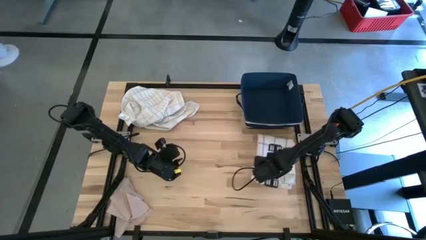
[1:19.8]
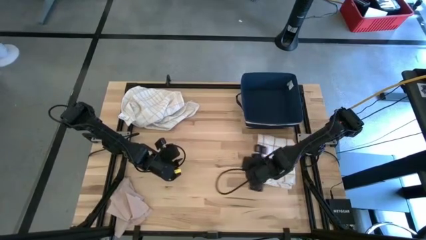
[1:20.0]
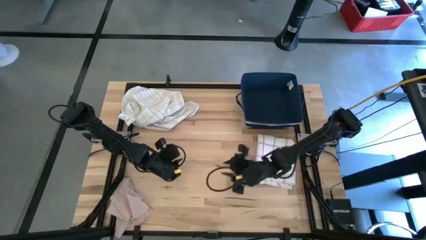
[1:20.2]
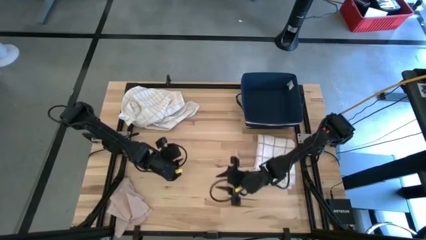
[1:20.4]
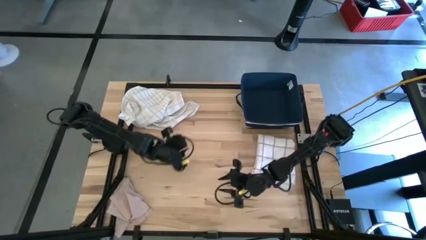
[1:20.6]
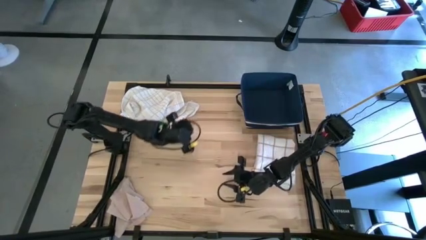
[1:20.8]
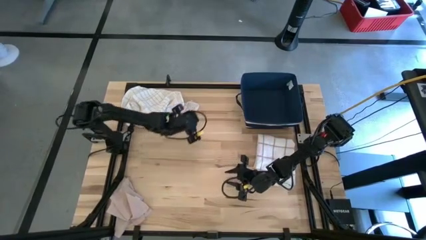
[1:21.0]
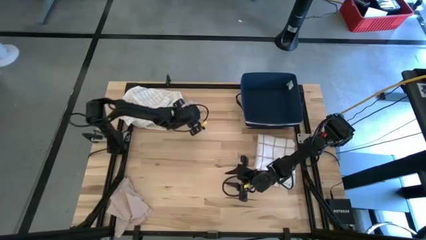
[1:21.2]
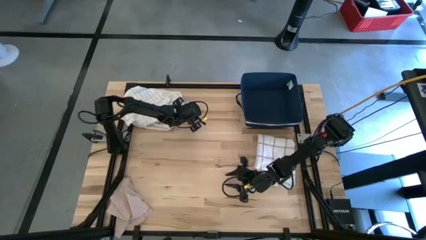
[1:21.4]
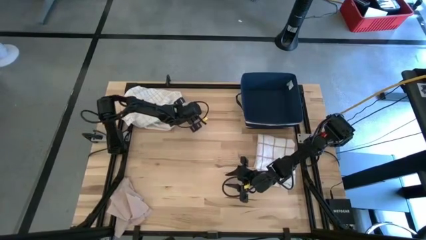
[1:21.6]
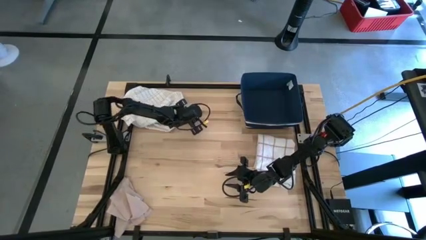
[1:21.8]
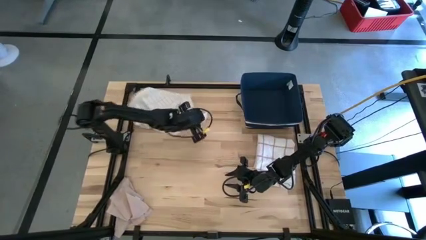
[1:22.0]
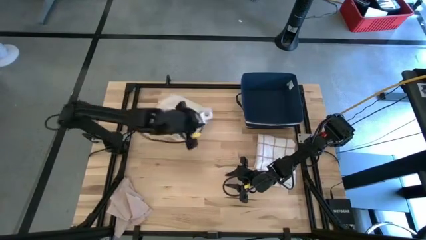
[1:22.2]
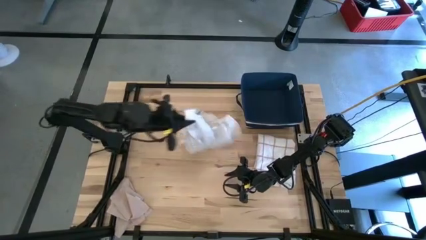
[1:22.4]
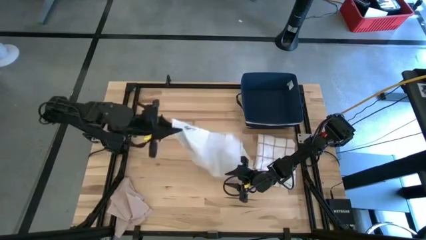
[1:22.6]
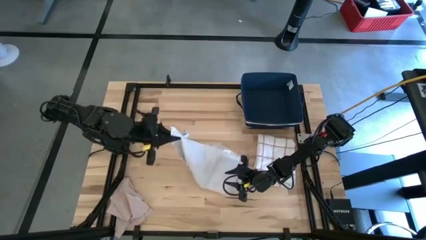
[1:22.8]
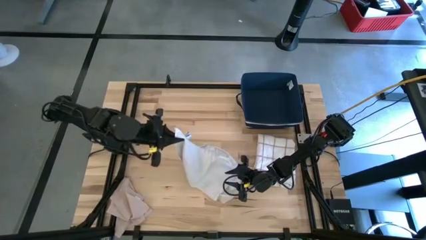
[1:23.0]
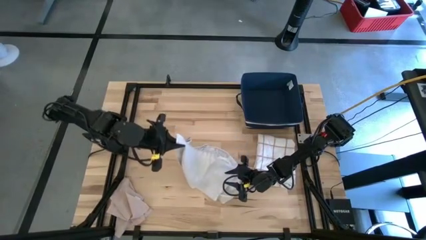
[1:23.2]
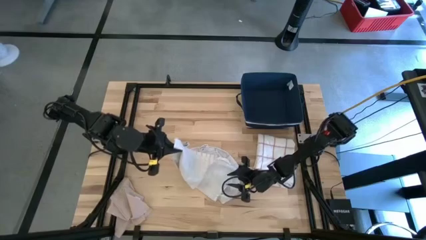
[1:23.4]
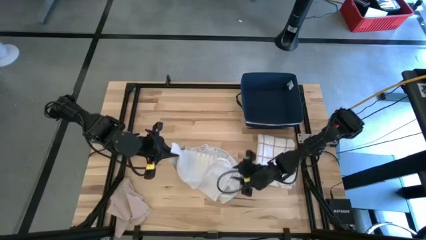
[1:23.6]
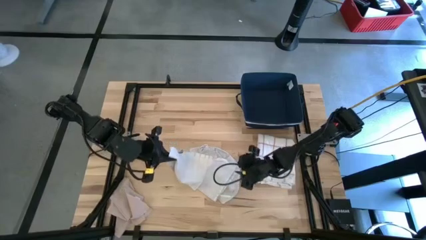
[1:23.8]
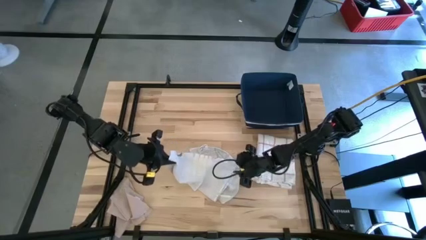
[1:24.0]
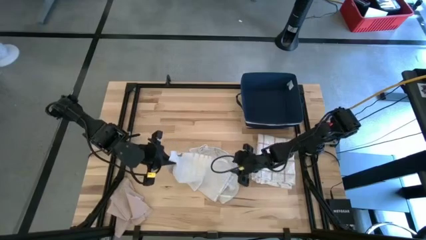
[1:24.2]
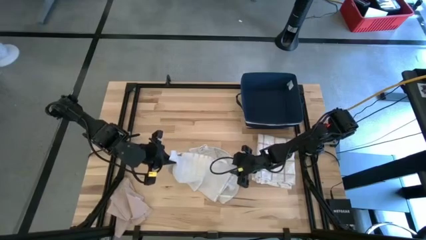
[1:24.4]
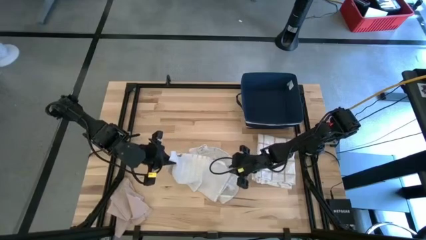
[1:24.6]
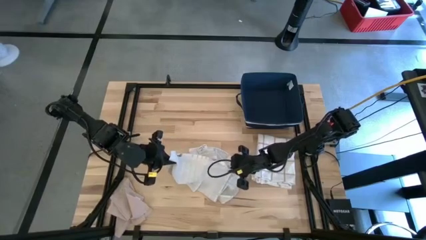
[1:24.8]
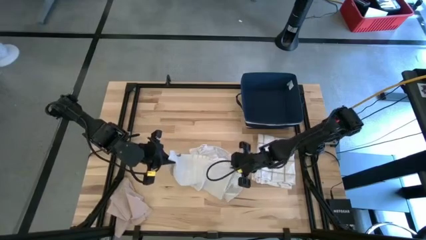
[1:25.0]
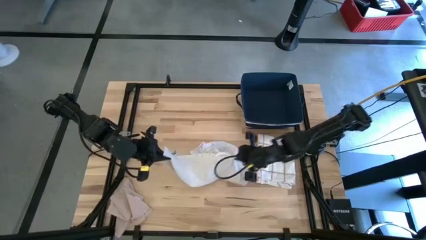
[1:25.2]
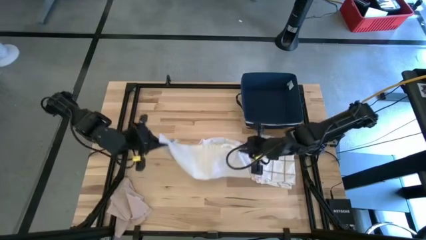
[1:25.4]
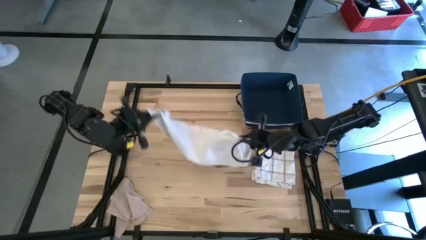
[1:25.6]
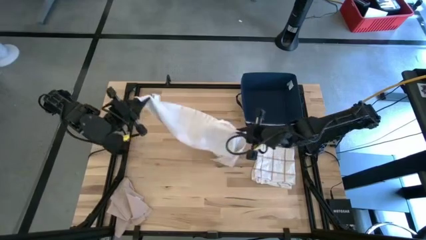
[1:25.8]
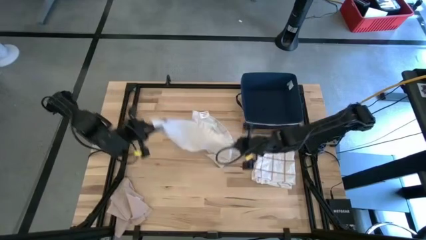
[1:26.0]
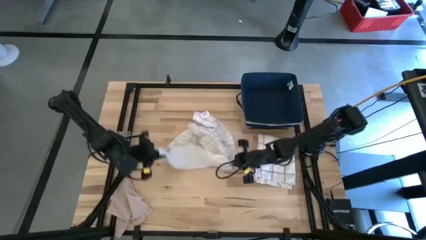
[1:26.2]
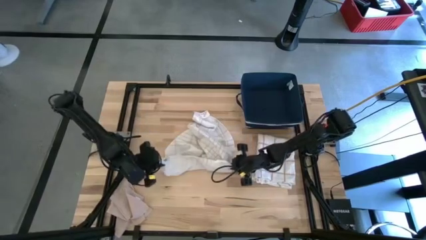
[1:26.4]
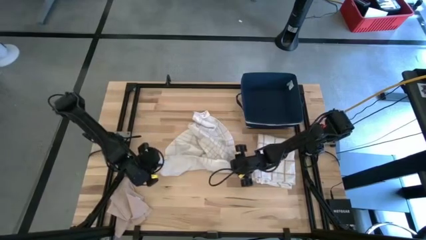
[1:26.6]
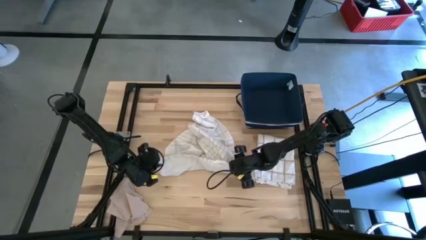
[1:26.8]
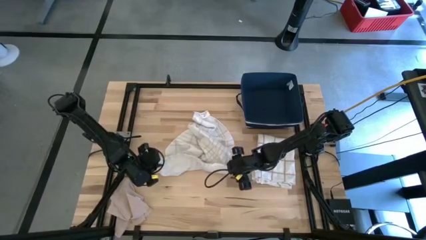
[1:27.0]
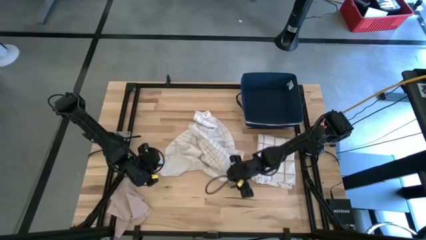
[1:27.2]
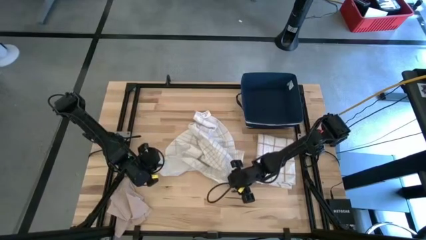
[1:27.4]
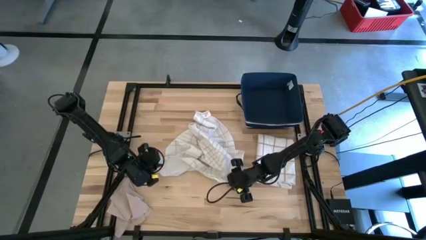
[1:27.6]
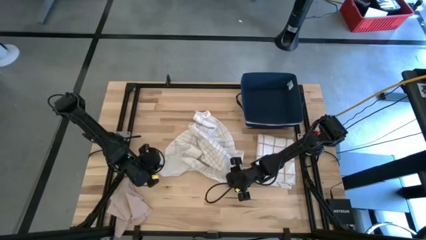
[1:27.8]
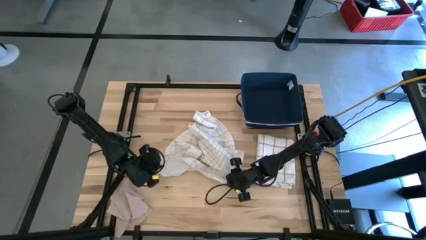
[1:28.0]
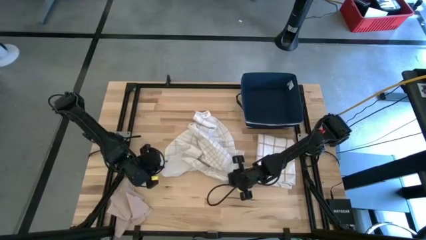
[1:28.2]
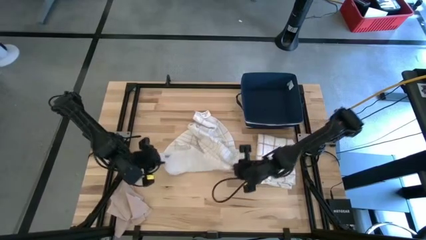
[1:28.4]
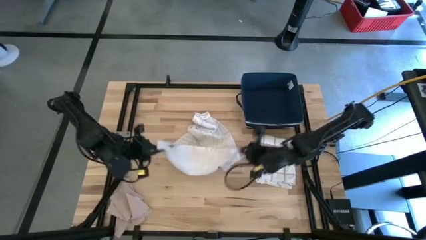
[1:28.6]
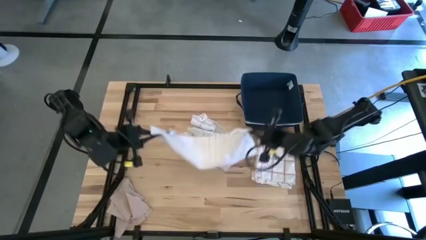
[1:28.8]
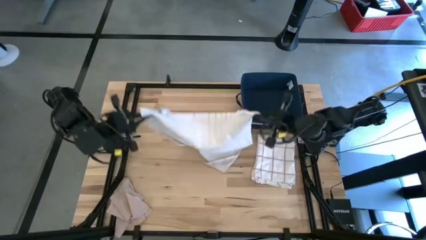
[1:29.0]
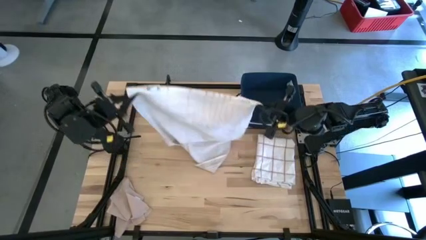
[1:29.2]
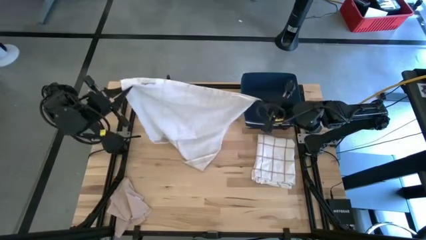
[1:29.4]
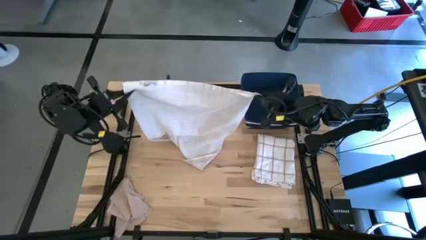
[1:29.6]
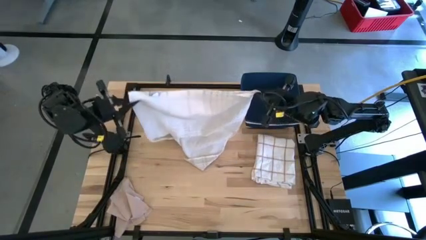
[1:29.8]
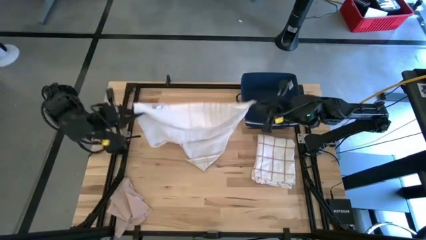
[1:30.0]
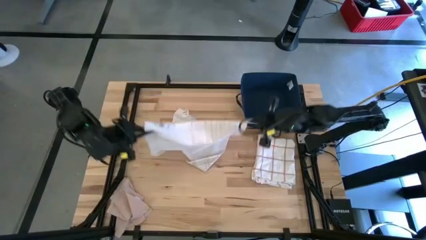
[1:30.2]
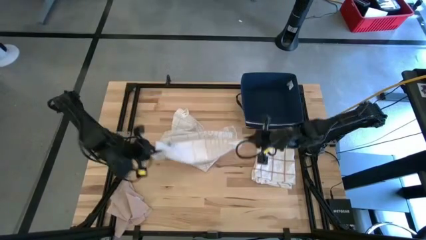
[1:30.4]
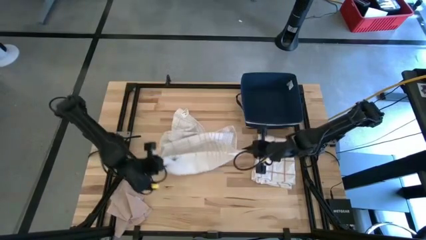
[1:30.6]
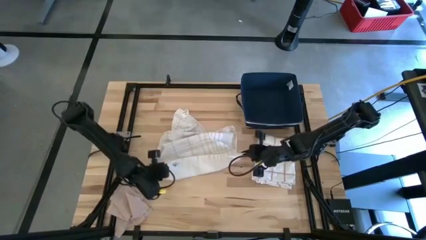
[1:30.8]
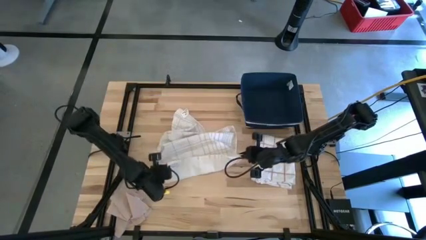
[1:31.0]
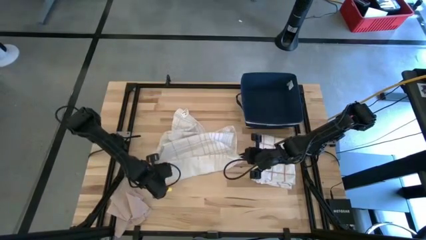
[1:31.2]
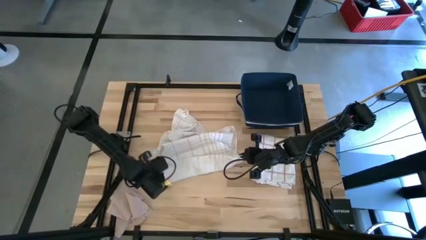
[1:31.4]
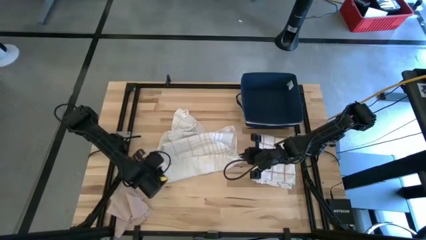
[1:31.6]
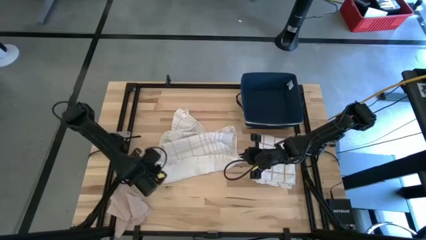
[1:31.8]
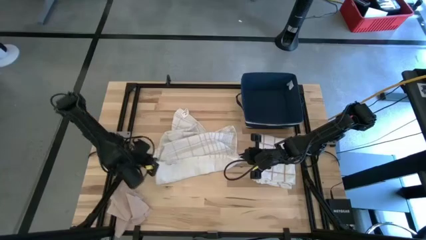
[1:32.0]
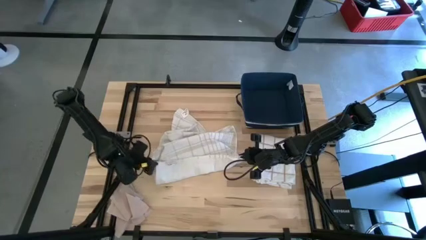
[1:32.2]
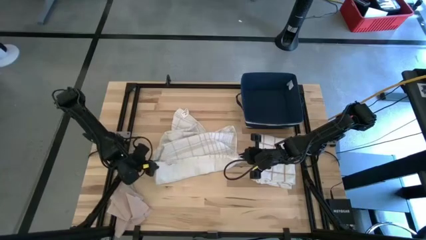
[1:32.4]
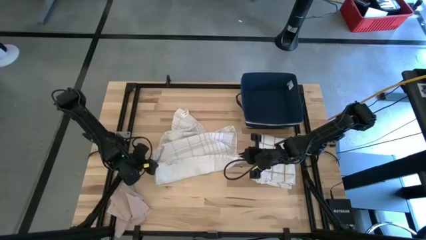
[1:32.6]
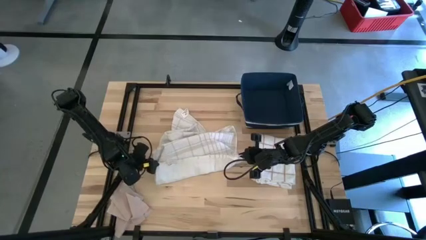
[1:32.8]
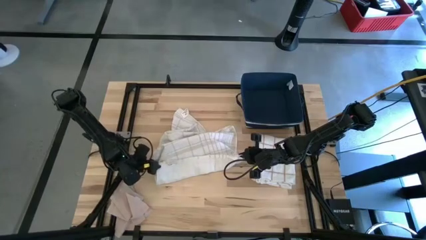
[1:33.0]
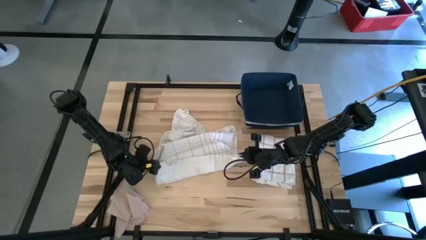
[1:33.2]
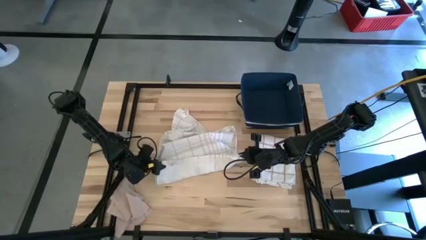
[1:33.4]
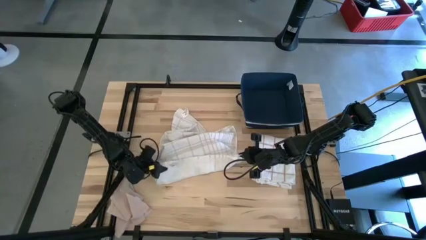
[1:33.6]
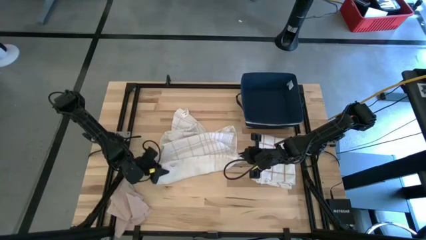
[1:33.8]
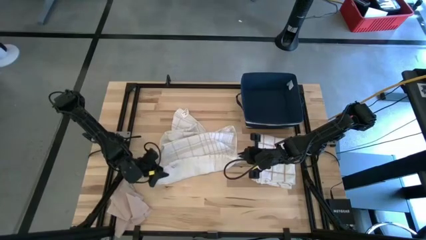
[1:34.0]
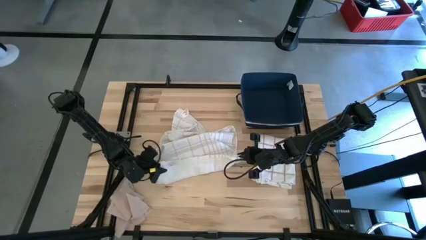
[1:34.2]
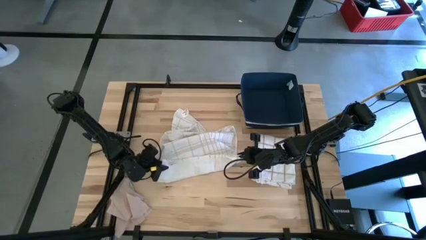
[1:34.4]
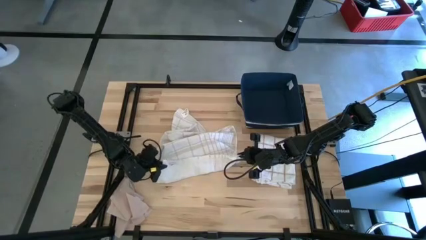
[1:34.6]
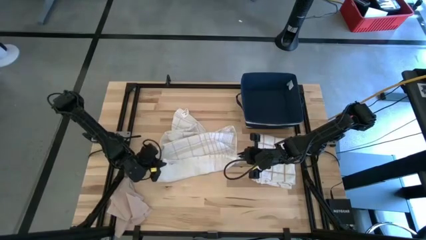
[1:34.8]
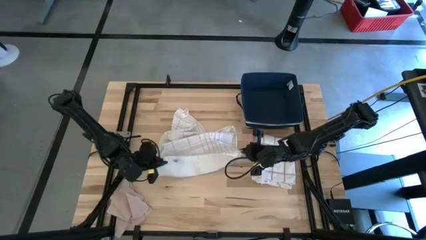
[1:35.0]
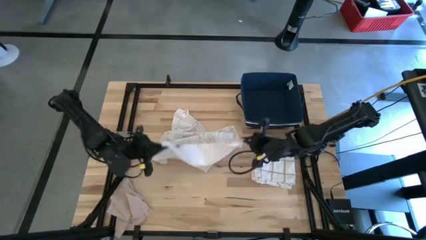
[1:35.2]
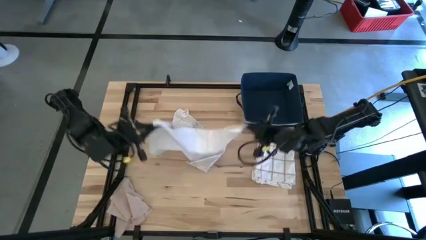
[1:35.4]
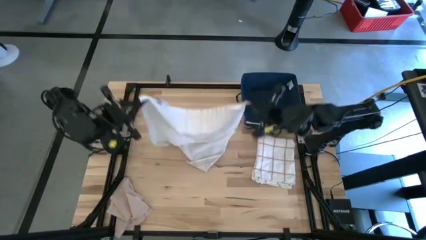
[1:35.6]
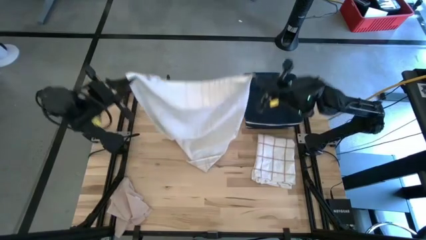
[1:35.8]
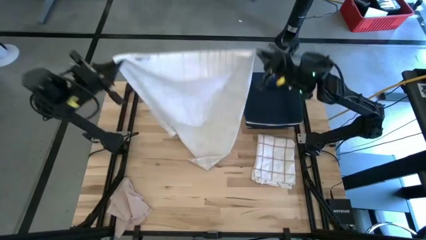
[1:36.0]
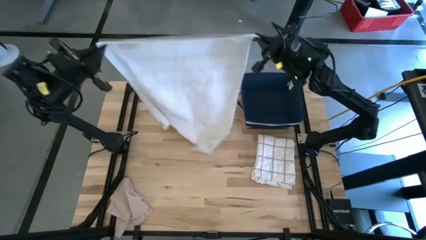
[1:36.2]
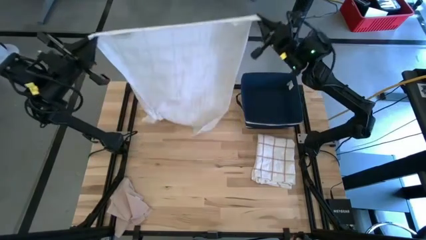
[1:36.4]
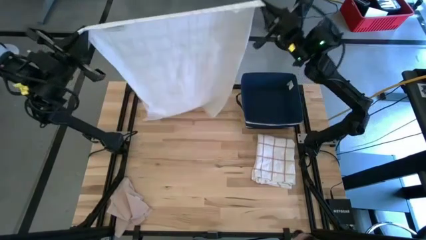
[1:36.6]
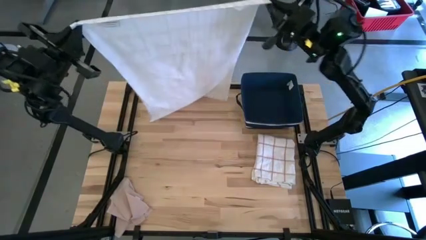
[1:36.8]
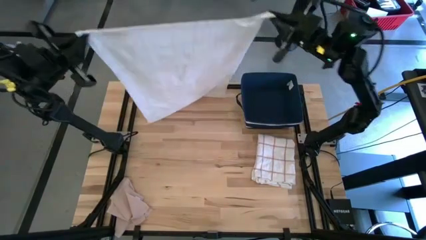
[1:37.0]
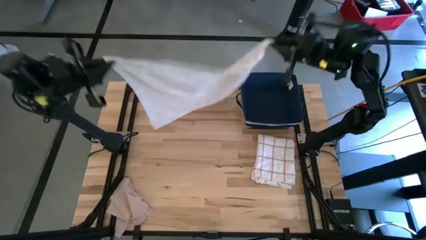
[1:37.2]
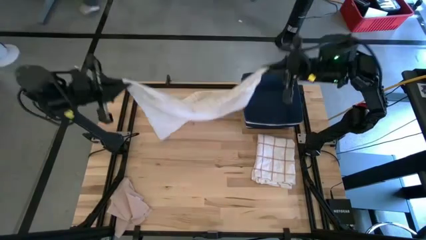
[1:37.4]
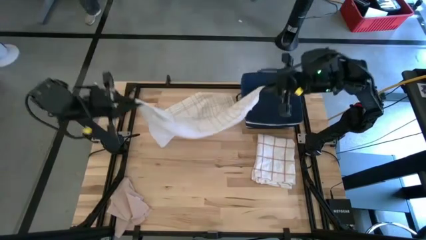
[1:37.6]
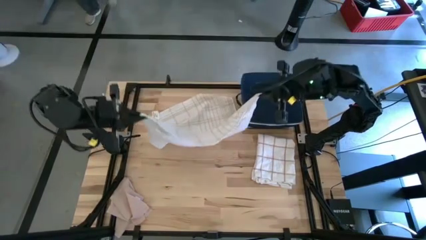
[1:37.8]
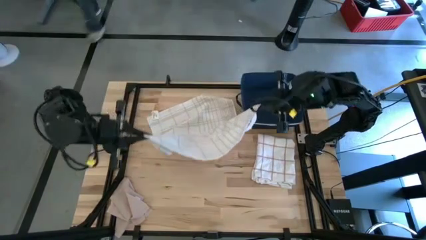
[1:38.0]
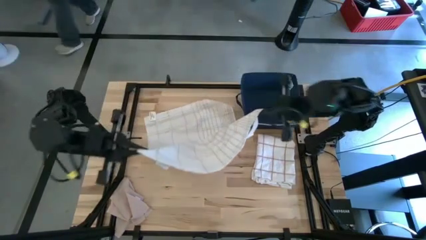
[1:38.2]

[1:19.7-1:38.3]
Task: Fold towel
Fold the white plaid towel
